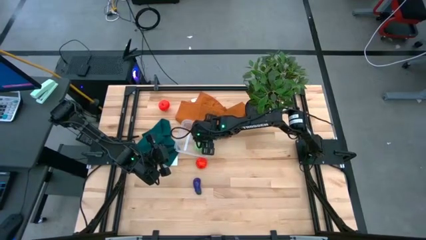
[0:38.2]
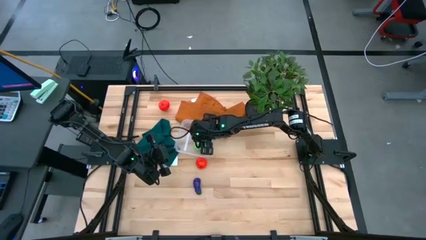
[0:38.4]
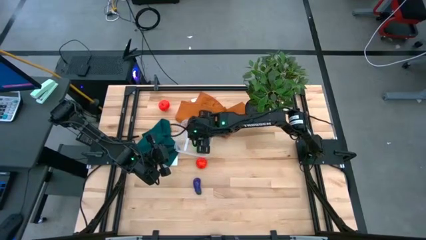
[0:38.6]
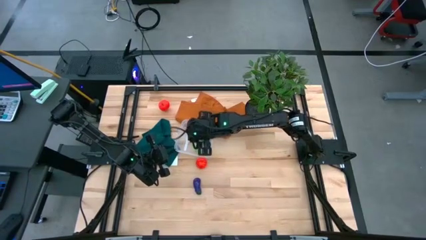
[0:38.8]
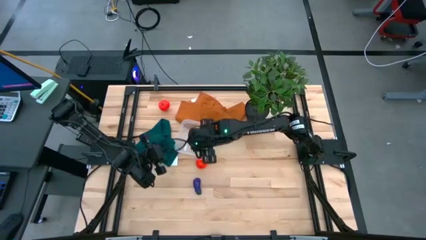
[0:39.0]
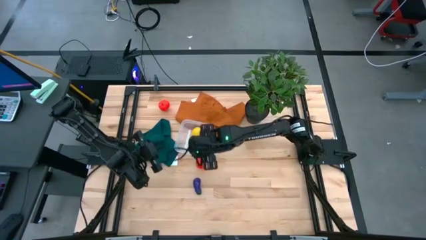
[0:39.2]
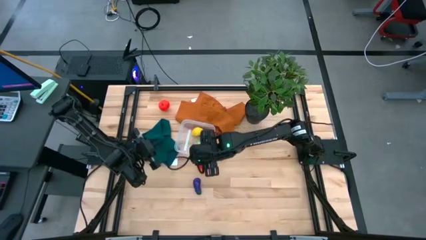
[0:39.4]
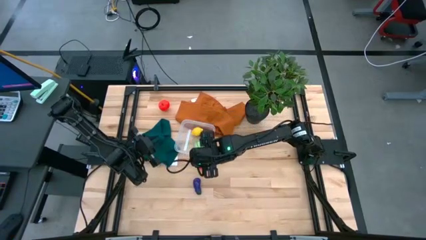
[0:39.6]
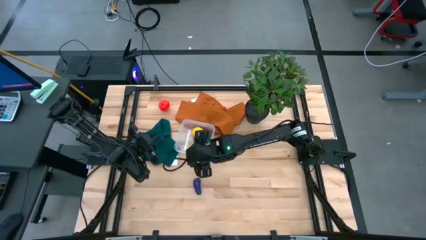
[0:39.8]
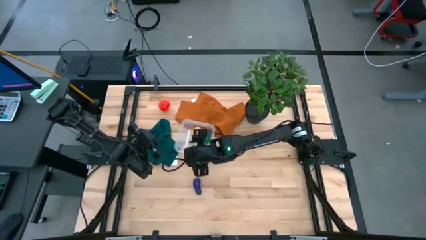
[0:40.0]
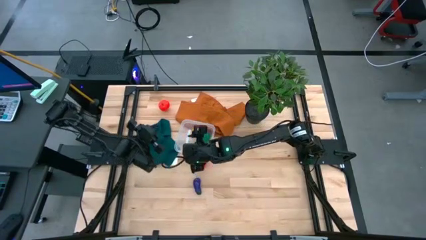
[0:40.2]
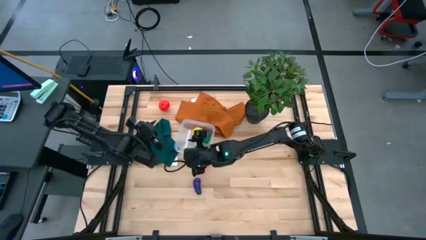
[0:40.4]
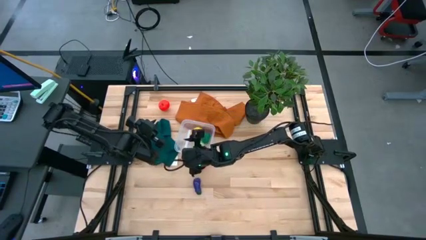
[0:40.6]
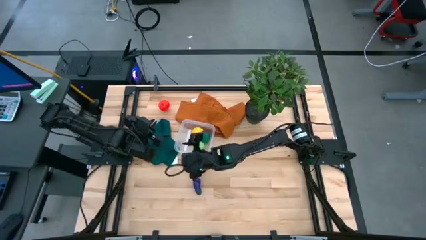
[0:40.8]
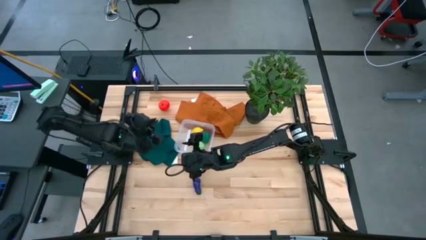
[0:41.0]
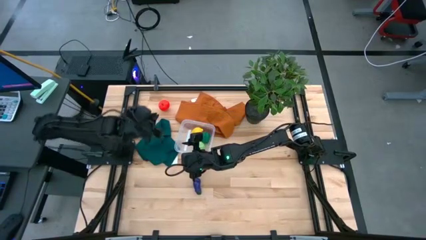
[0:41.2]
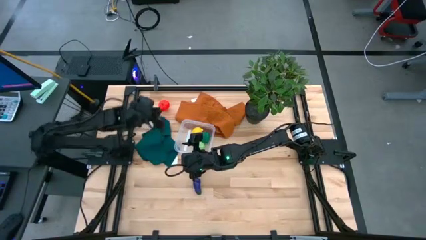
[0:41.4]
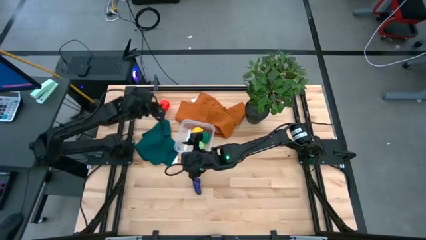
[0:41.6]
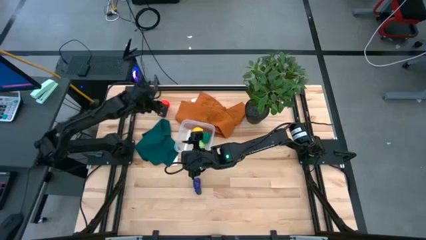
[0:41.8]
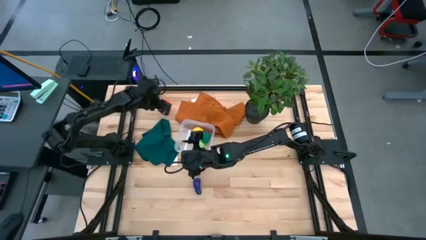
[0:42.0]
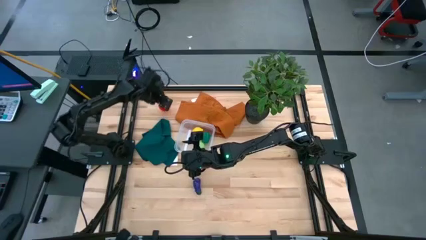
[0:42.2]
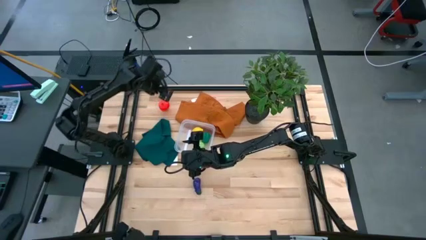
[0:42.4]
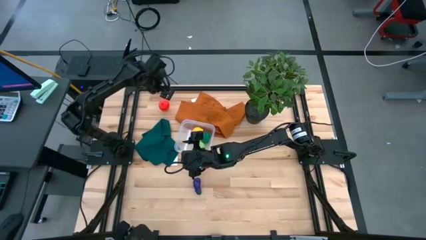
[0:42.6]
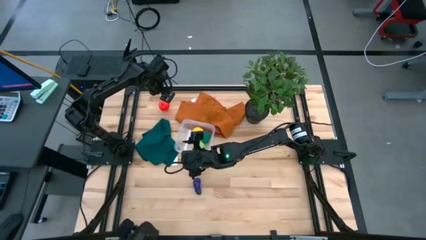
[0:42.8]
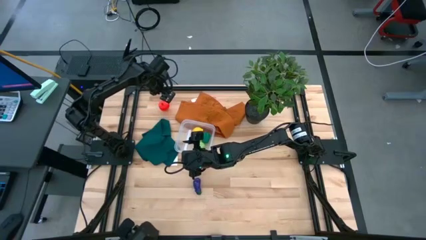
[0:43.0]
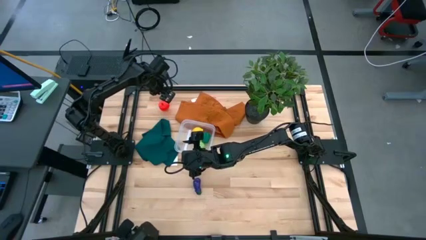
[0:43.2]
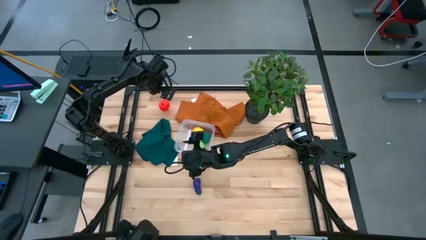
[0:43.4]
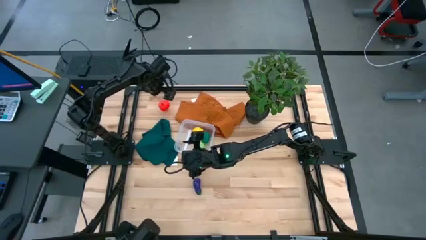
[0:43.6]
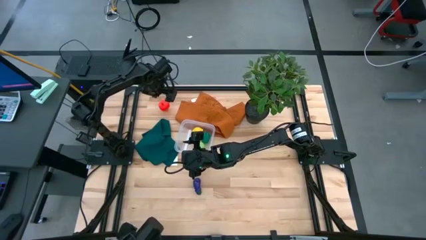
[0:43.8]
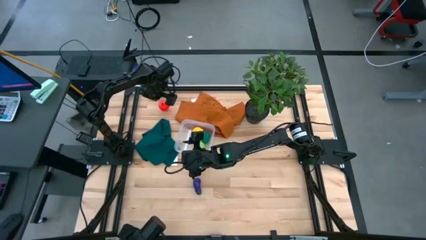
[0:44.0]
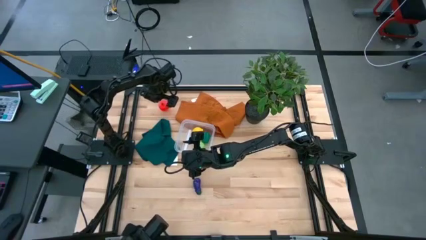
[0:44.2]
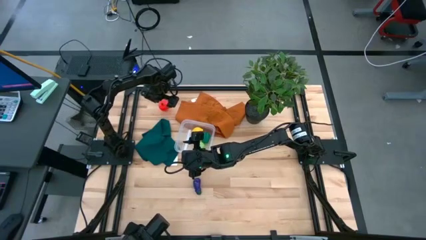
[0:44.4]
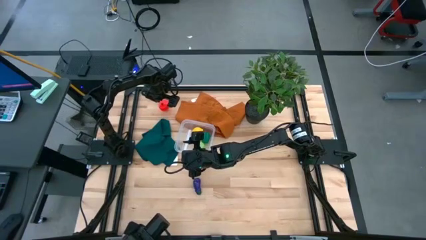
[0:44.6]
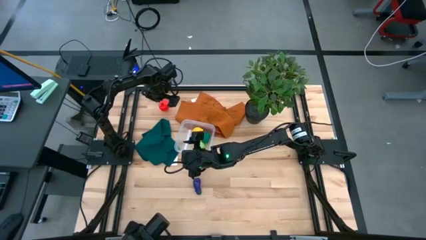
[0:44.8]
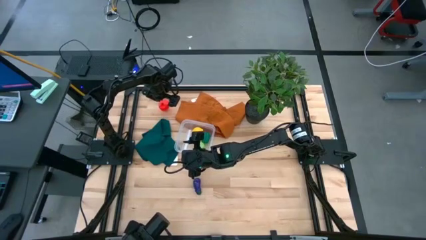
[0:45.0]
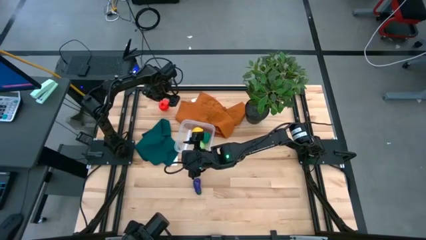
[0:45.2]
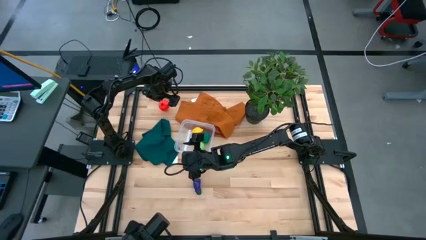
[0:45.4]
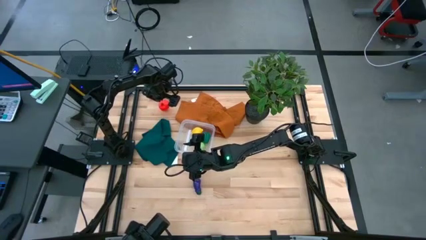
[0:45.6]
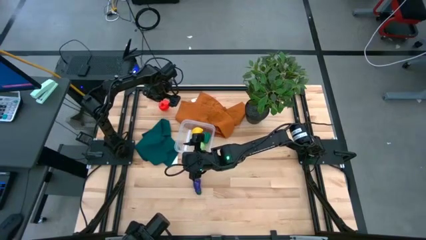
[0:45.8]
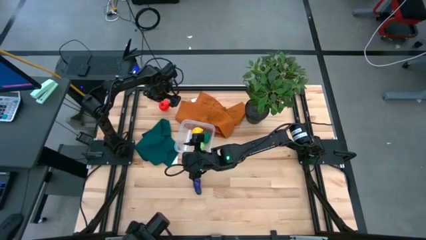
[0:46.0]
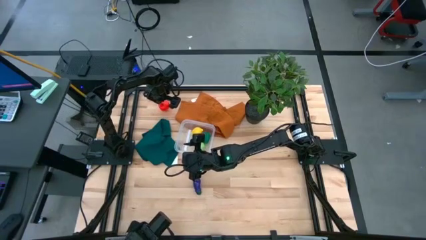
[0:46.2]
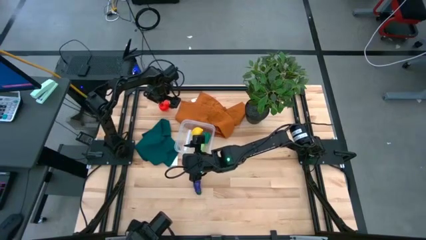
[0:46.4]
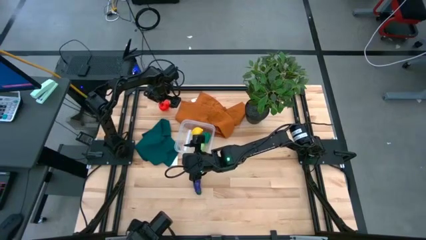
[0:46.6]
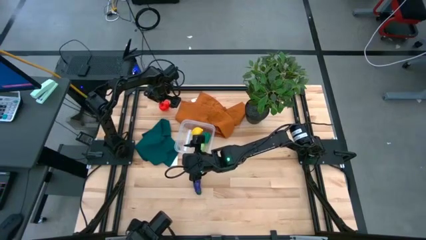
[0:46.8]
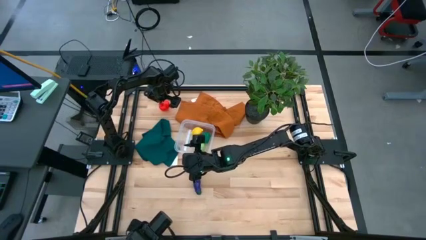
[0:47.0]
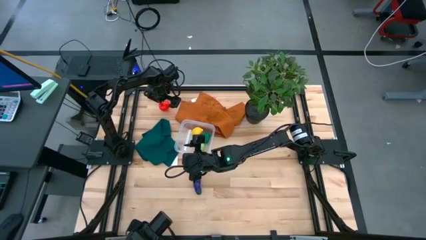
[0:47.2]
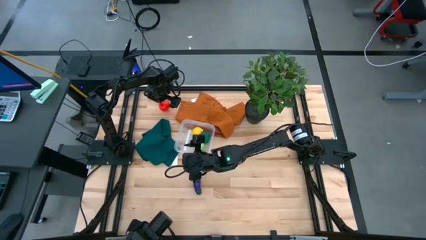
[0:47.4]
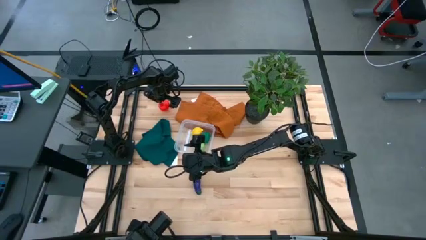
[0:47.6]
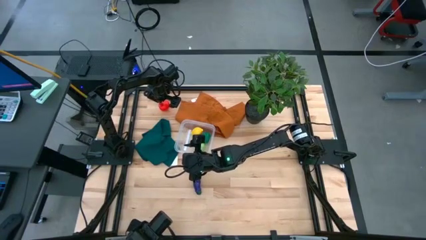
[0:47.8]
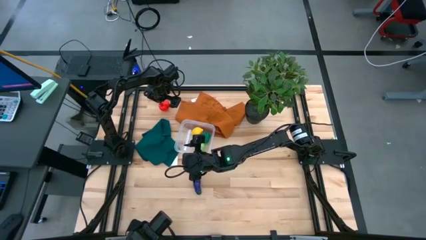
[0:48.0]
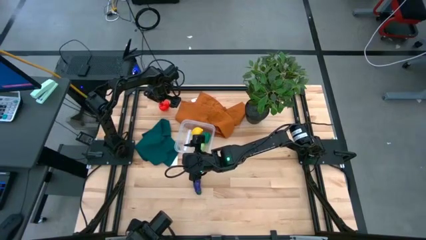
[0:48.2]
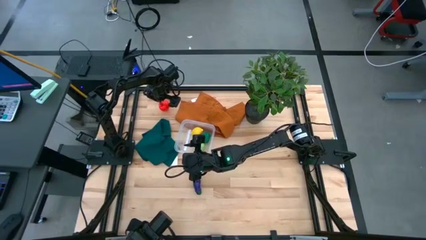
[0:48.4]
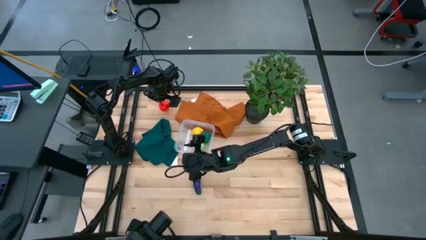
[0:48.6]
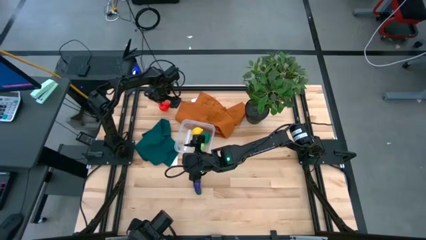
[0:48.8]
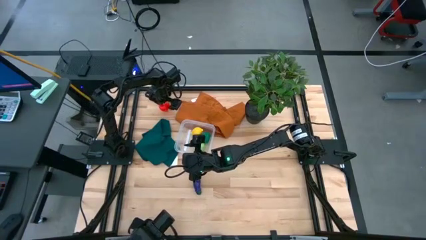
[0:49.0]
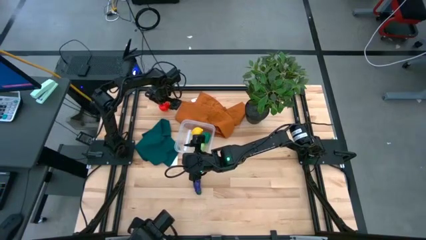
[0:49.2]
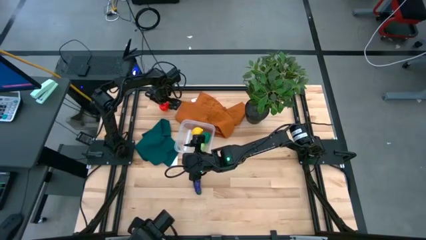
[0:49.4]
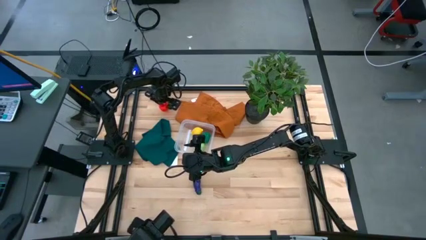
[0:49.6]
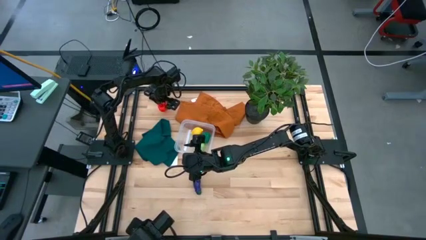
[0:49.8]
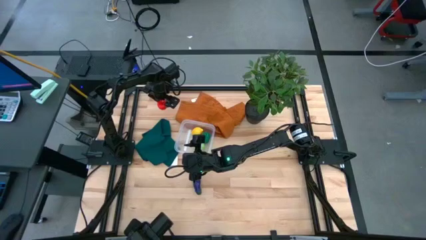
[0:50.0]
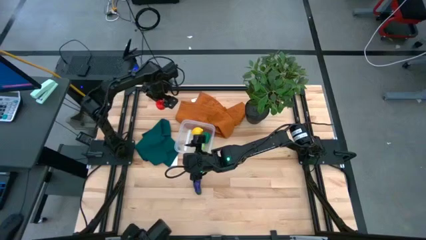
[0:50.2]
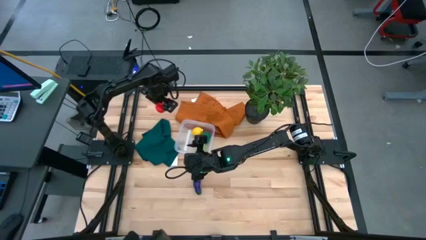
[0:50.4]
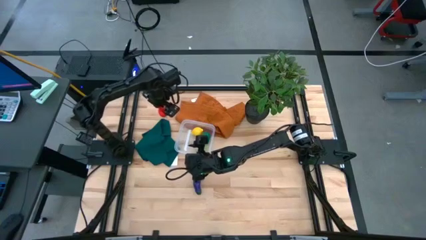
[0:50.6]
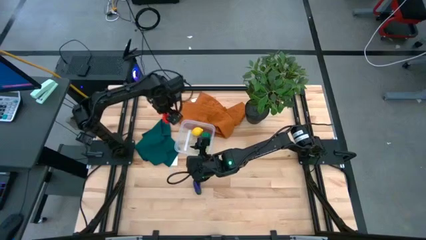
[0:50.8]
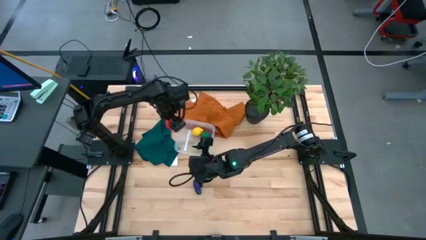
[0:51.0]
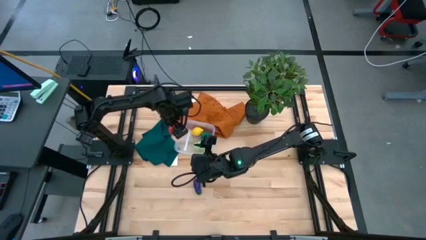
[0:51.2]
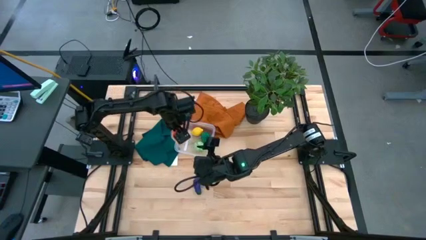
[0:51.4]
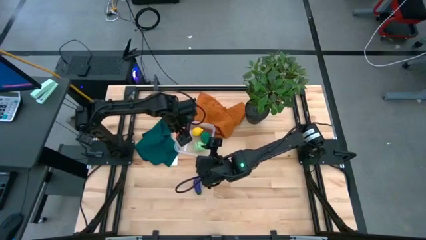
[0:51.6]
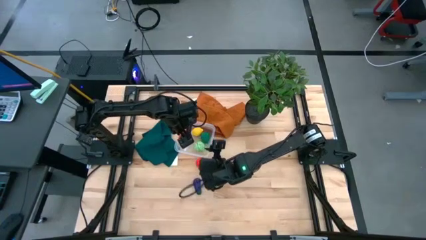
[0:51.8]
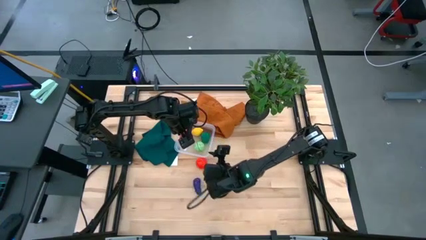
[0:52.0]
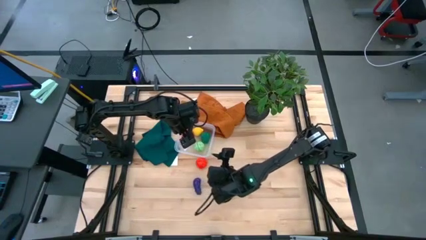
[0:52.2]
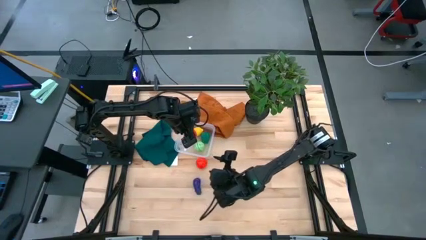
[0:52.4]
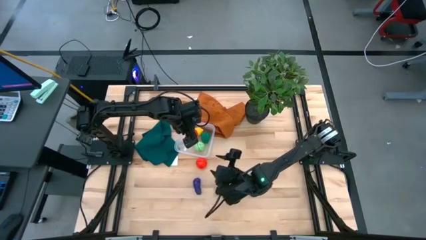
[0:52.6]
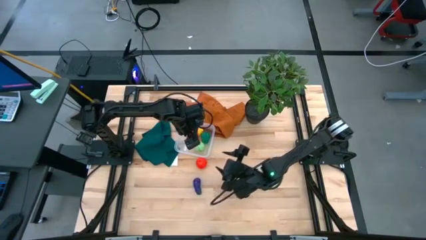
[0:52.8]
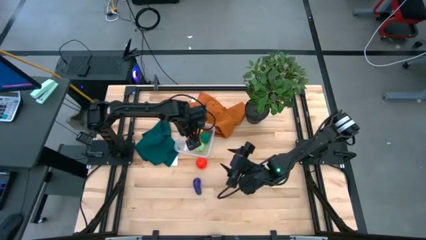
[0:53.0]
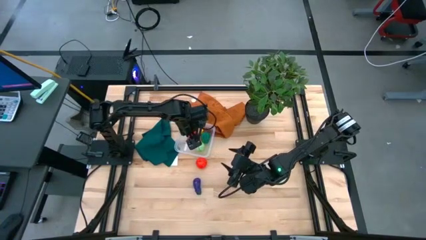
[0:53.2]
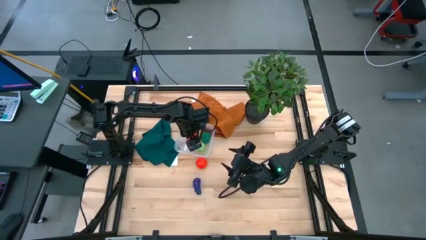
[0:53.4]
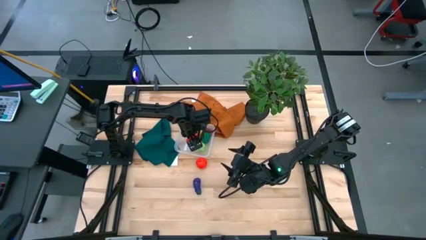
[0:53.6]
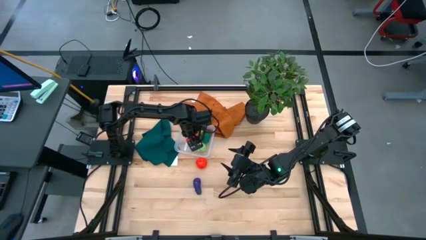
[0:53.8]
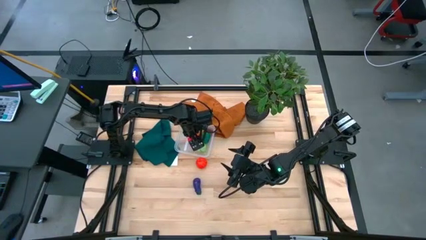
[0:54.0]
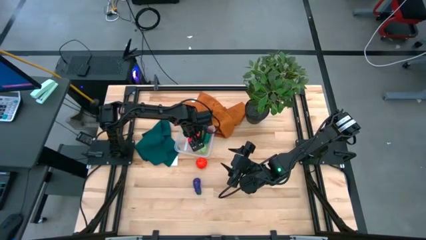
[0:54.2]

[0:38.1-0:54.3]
Task: Pick and placing Produce into tupperware
Put the red apple into the transparent bin
